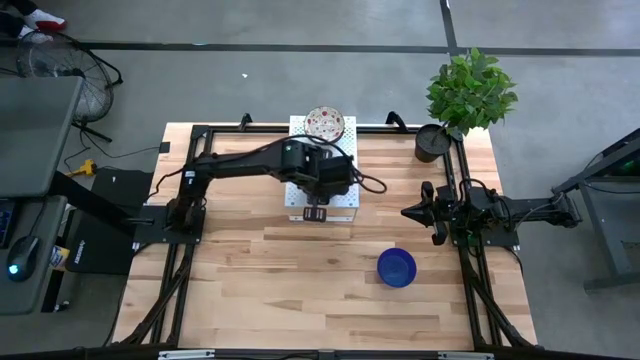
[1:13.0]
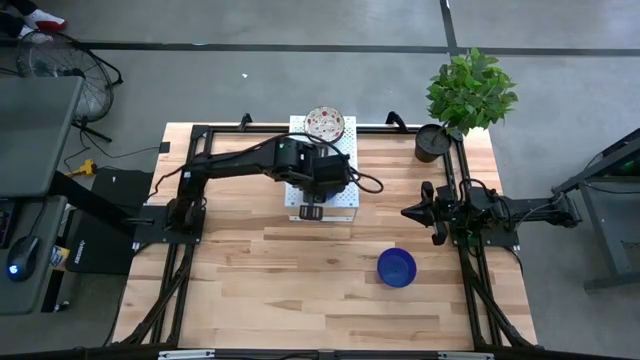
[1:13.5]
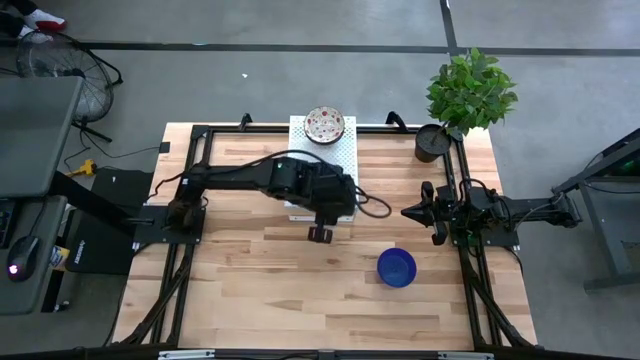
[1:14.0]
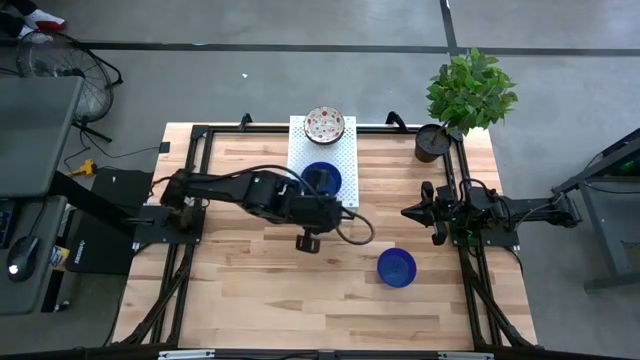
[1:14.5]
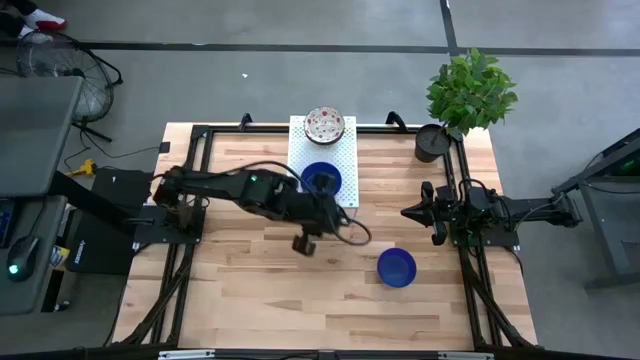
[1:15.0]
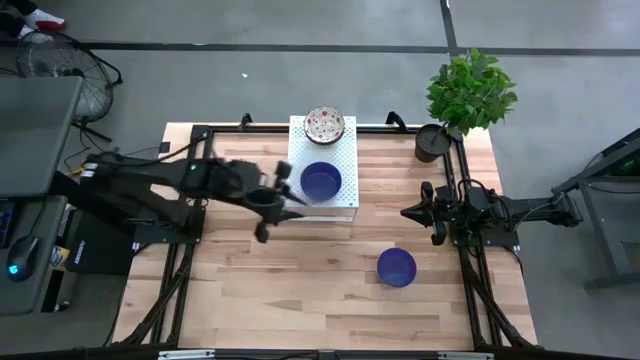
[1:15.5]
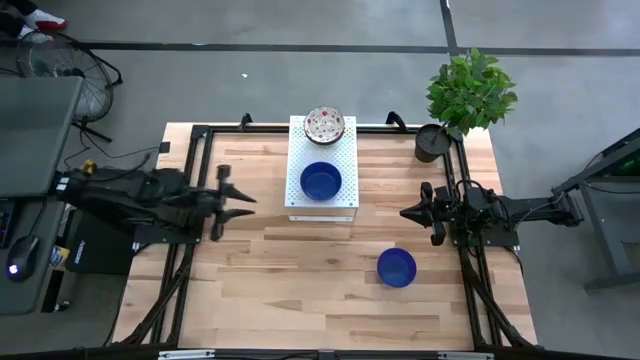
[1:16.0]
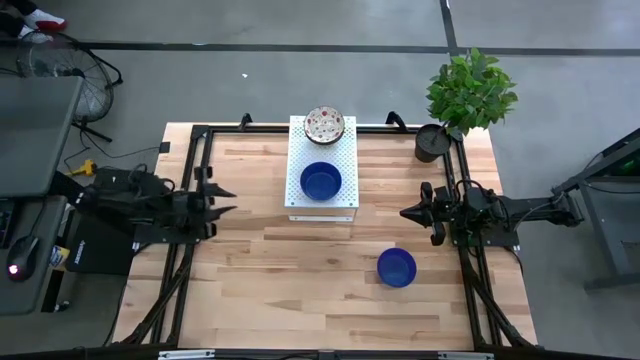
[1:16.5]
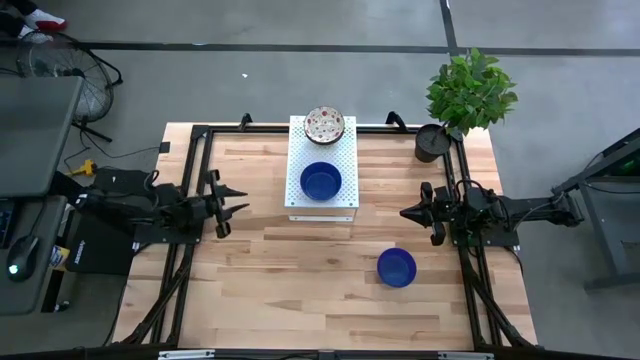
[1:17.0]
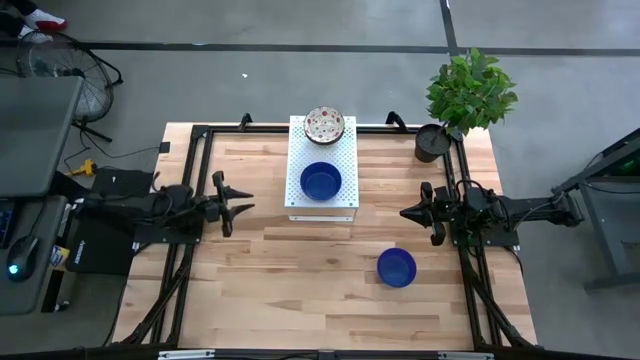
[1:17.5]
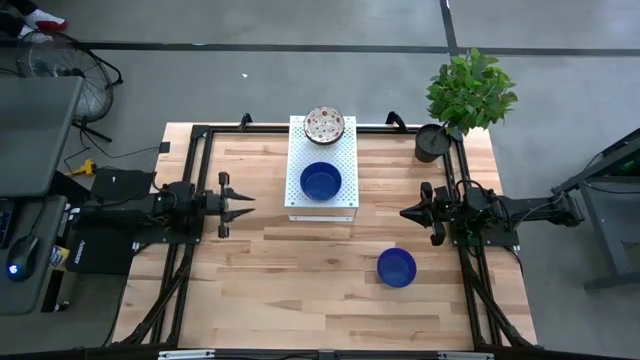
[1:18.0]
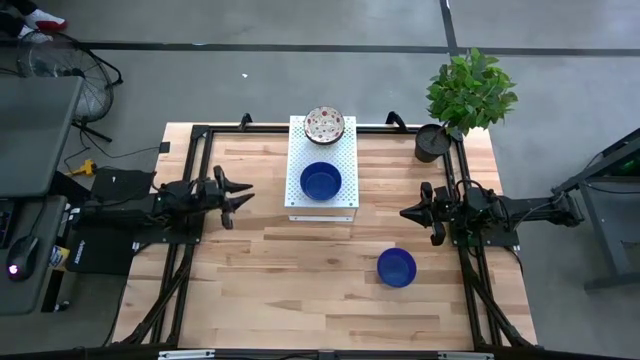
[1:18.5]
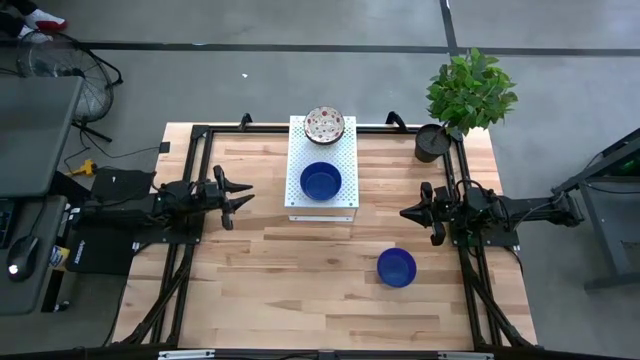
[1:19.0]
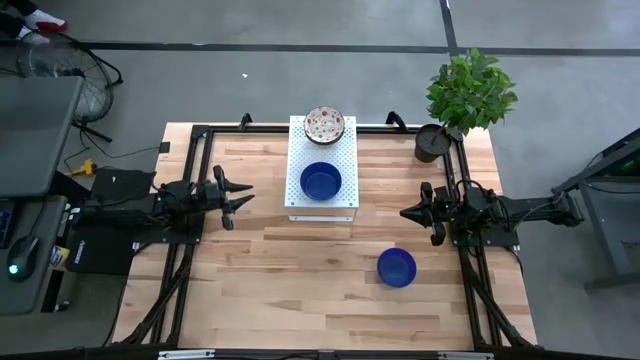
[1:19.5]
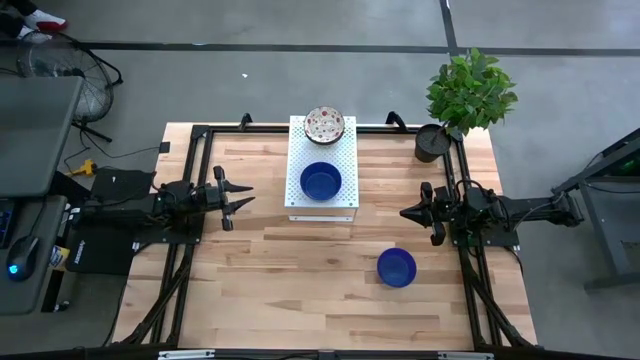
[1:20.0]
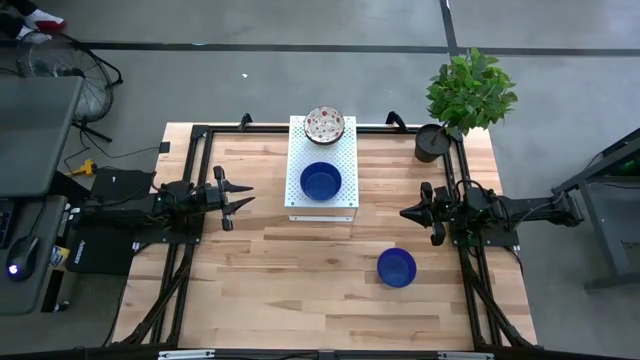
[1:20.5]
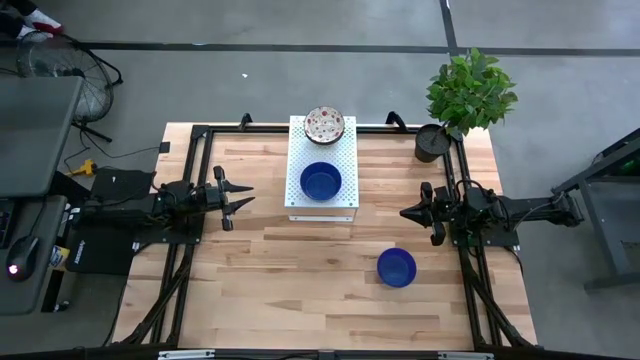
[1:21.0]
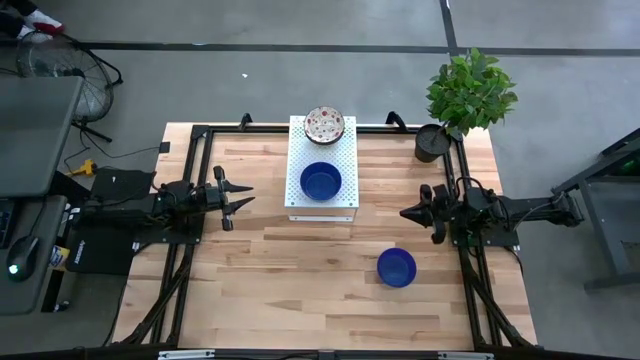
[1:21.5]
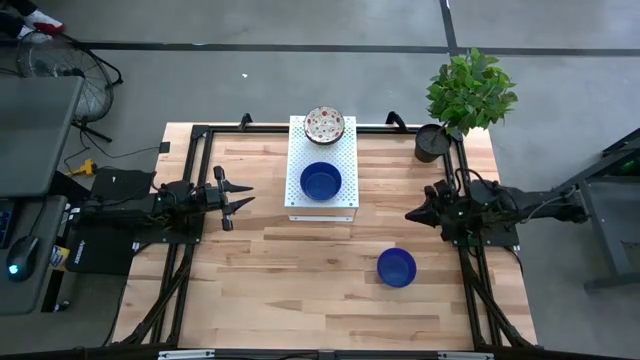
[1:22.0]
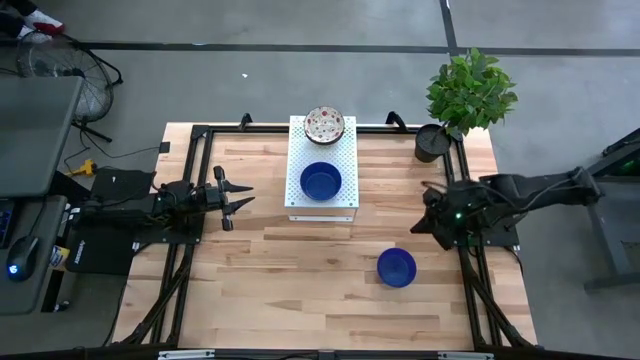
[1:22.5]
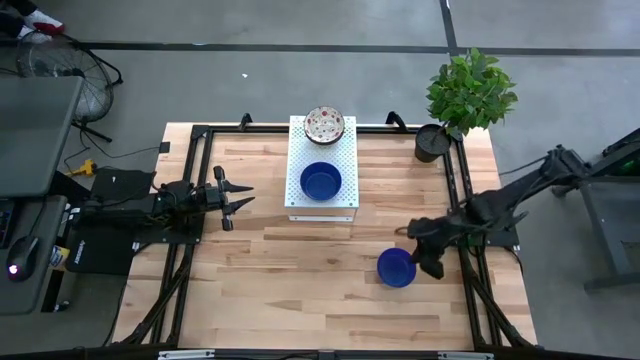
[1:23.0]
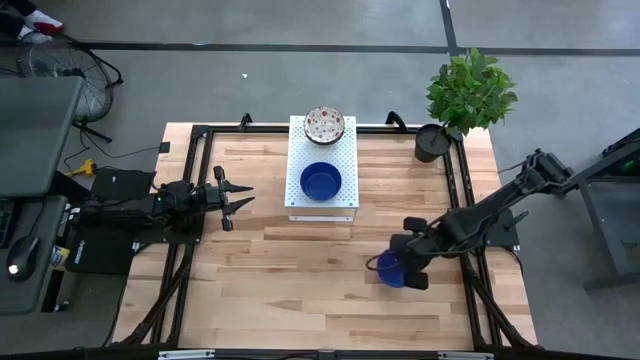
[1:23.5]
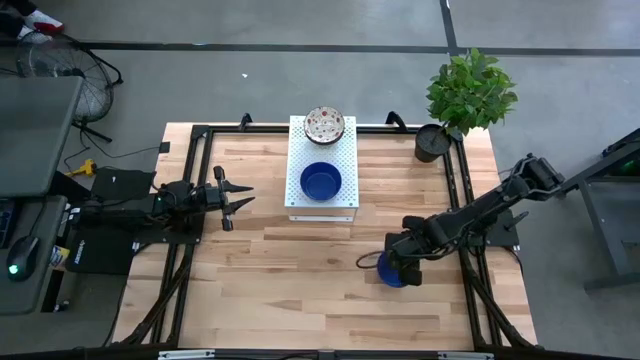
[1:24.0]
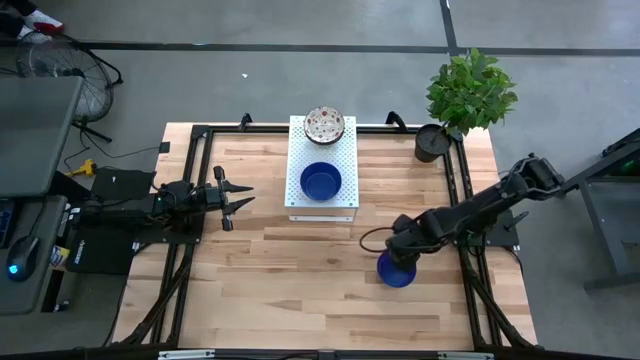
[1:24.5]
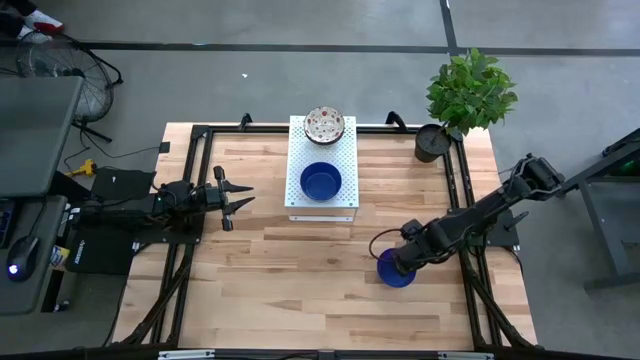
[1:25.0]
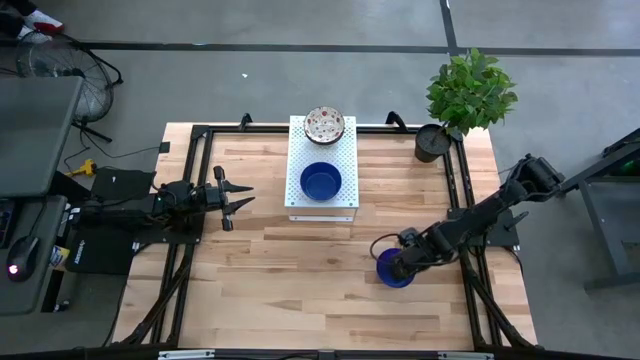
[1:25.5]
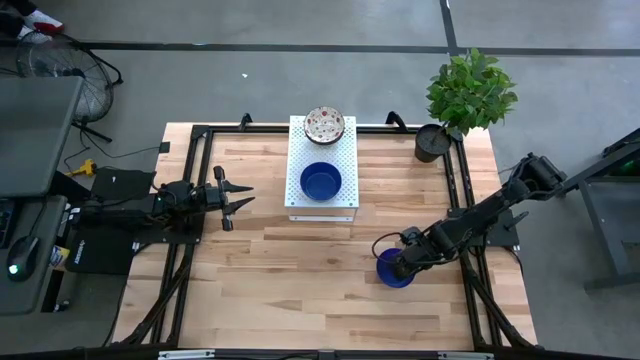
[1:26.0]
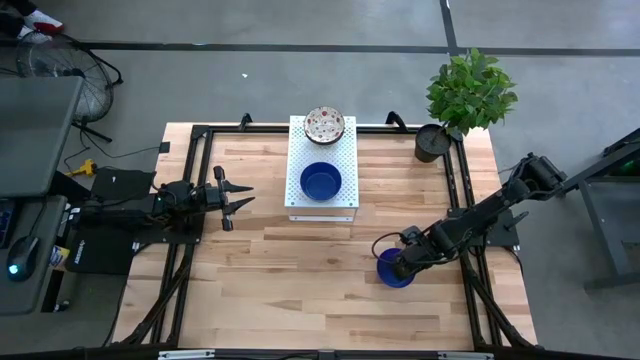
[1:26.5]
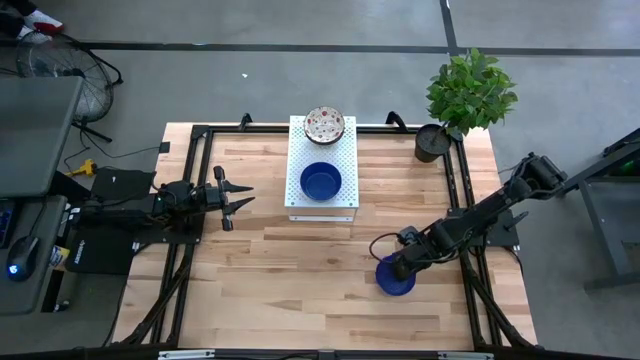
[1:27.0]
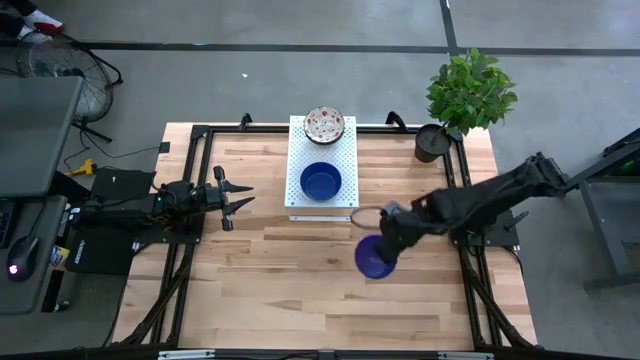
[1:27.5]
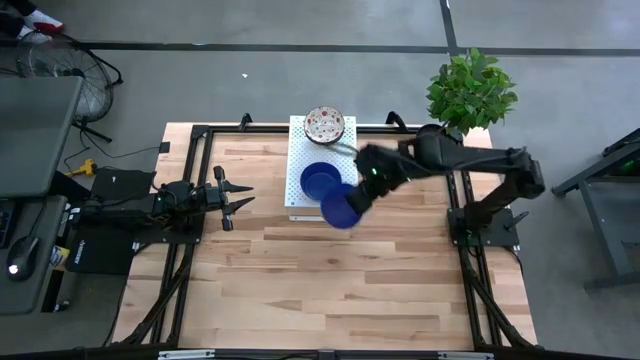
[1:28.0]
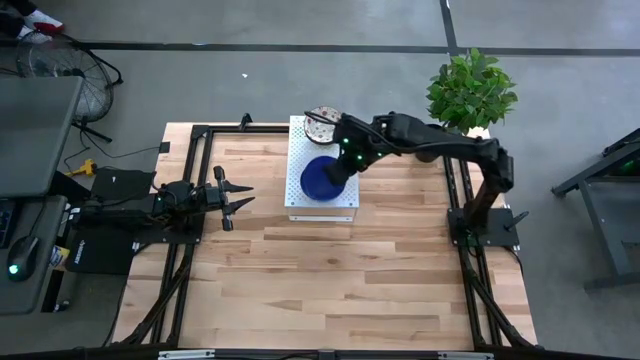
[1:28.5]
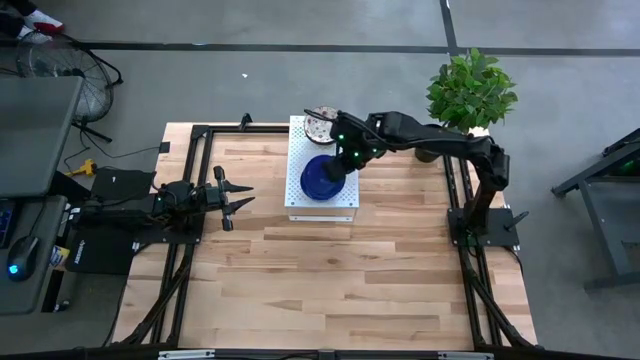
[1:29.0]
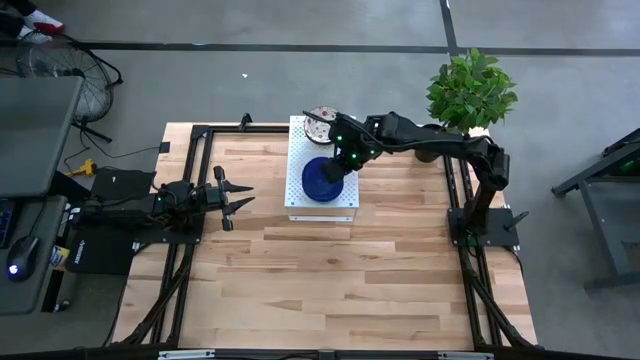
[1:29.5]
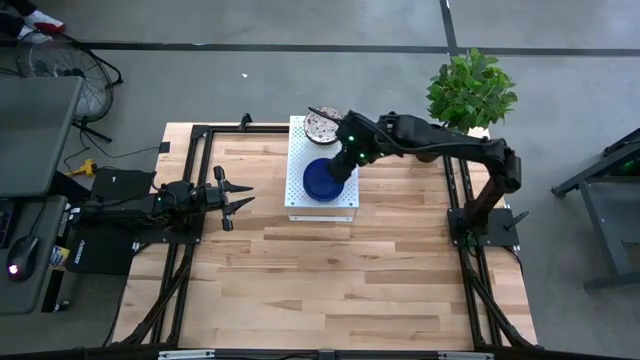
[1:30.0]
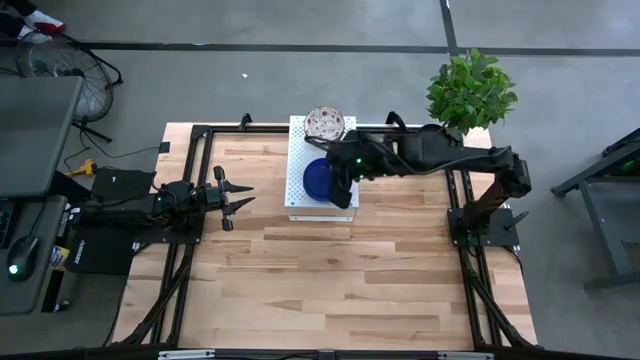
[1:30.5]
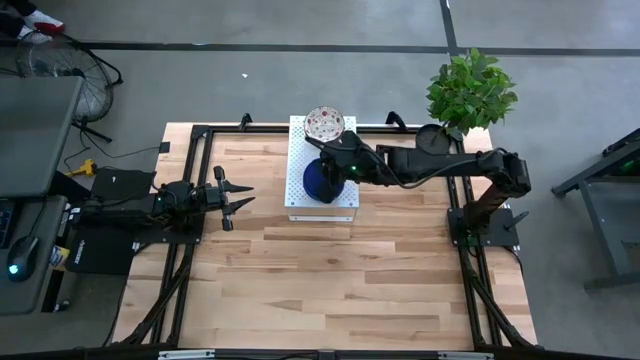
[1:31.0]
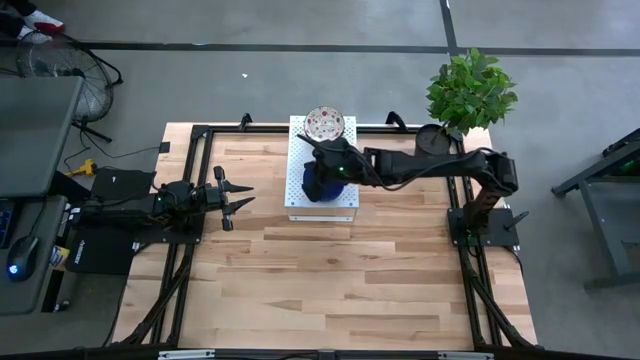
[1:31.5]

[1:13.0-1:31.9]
Task: Pick & Place Mini bowls
Stack the violet bowl on top of the violet bowls on the shelf

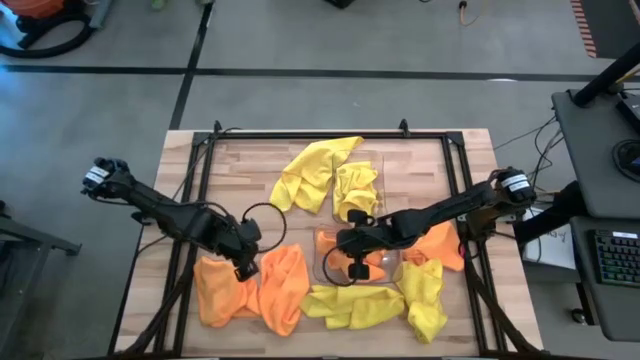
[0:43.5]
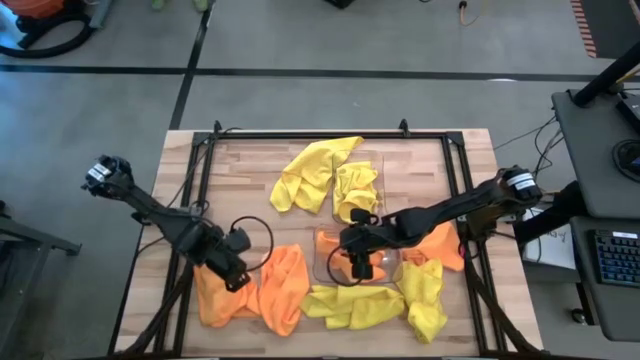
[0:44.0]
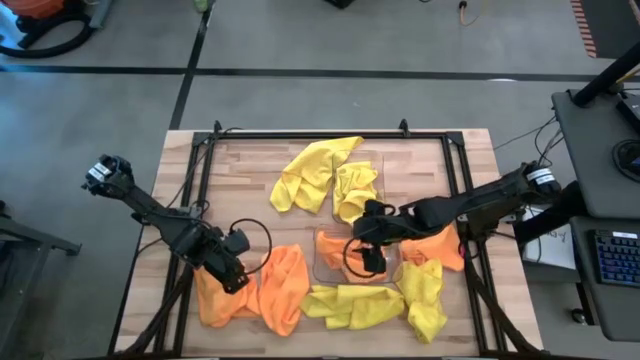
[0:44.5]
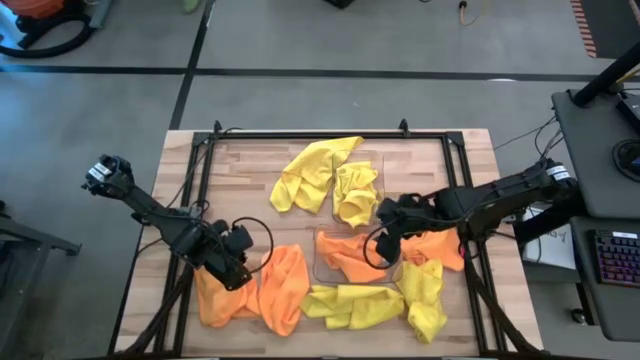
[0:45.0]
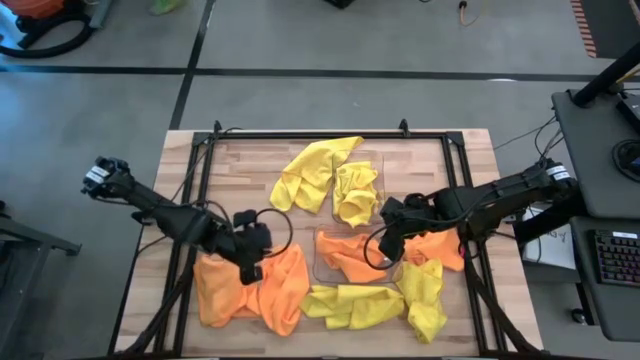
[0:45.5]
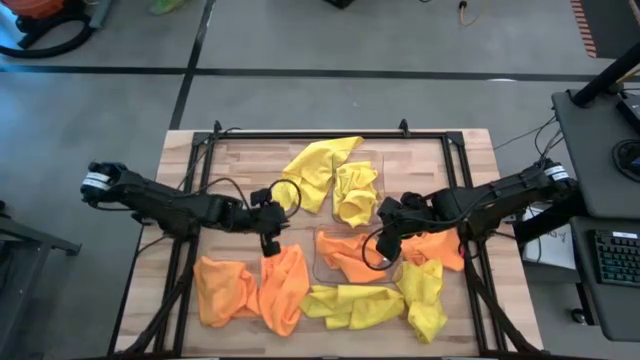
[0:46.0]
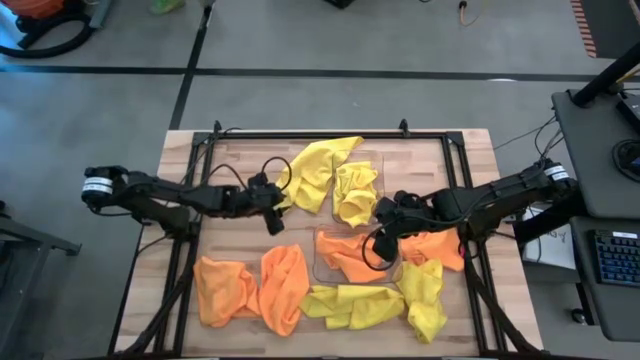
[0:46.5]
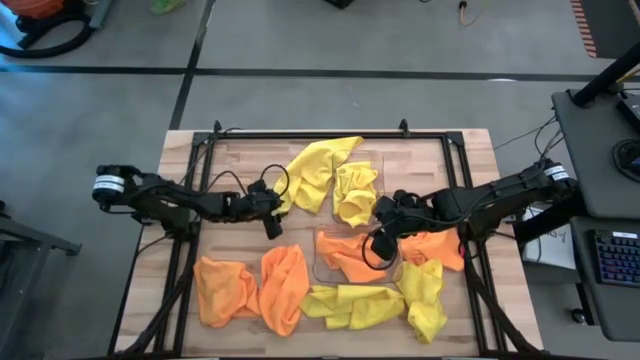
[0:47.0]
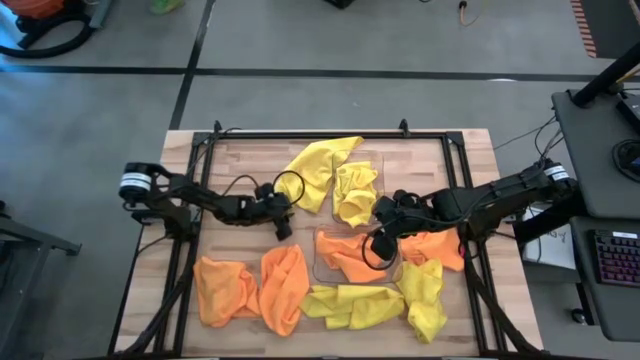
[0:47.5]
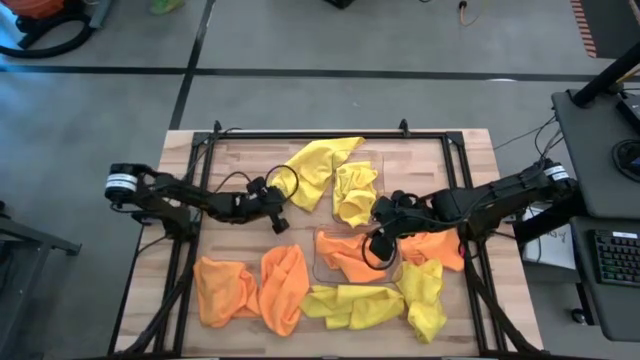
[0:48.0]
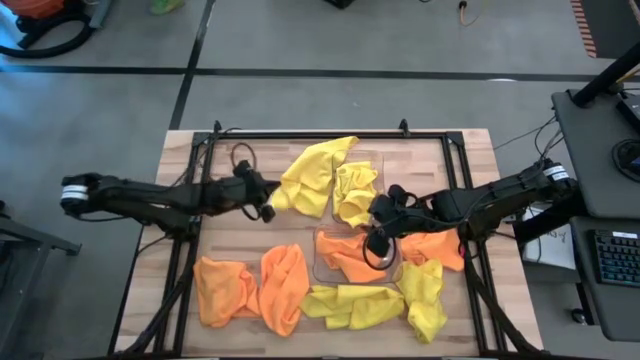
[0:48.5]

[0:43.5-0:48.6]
Task: Sort microfiber towel by color & place in baskets
Put the yellow towel into the top transparent bin
